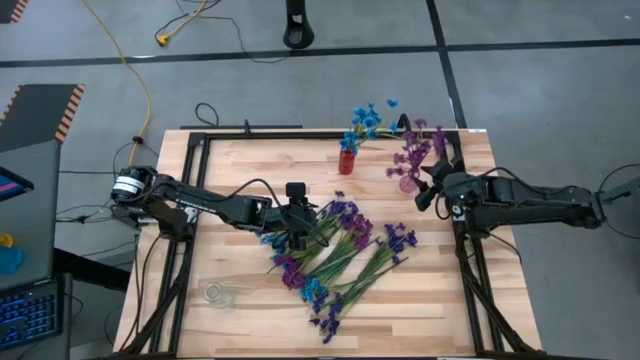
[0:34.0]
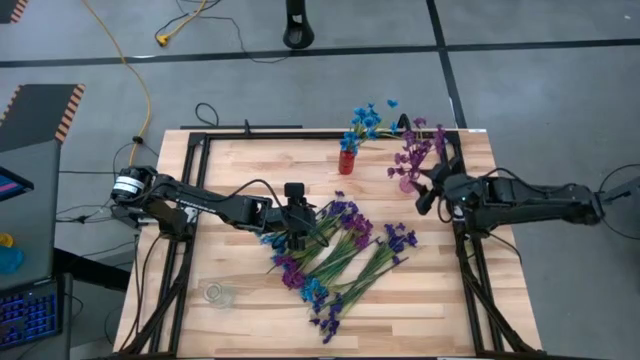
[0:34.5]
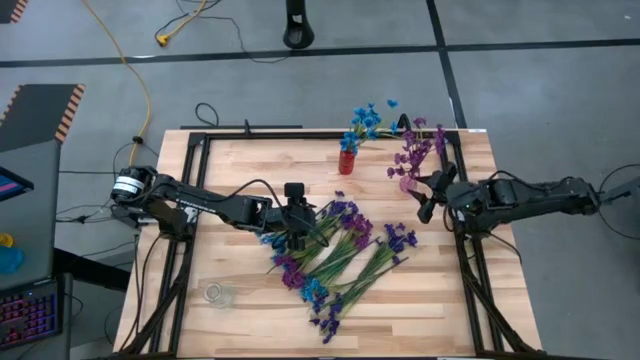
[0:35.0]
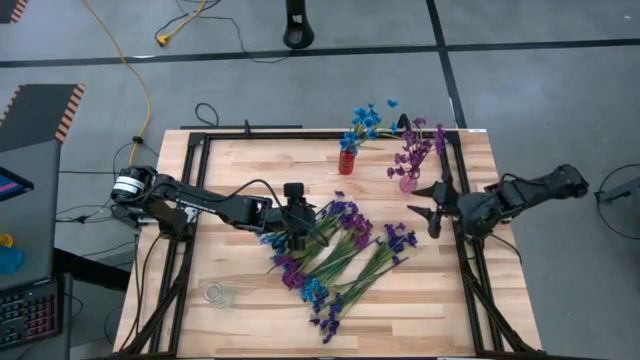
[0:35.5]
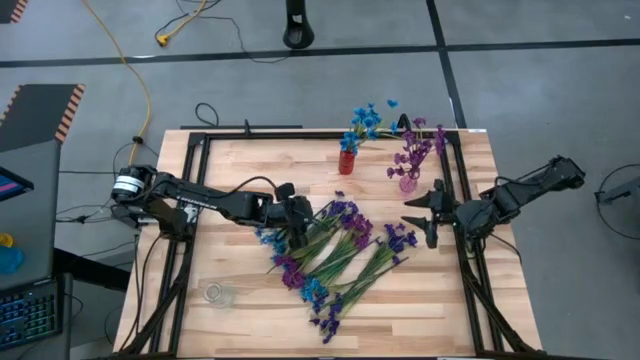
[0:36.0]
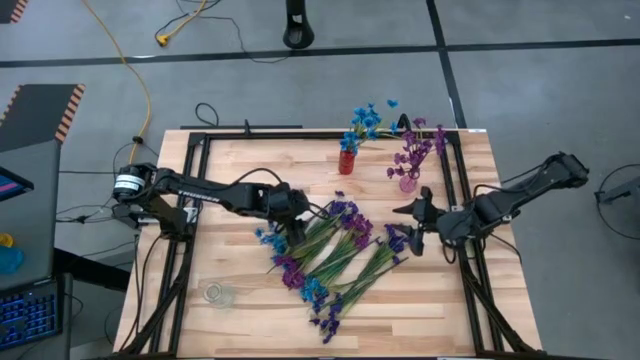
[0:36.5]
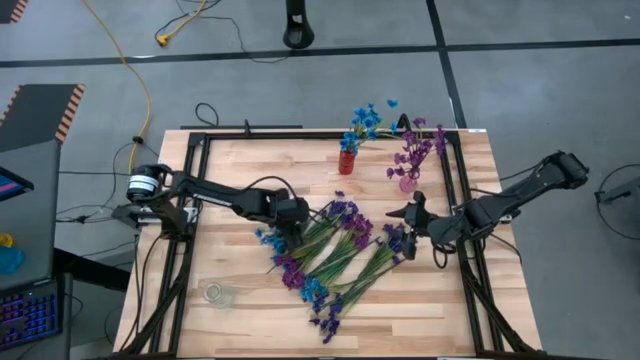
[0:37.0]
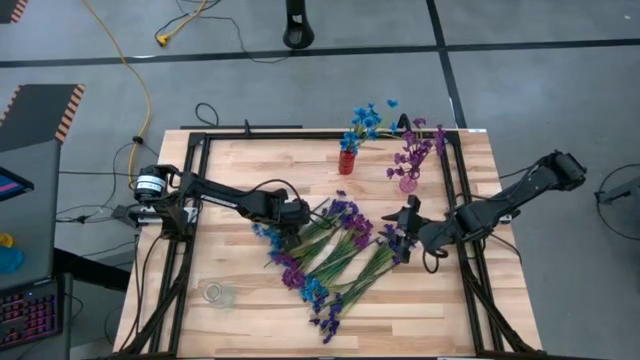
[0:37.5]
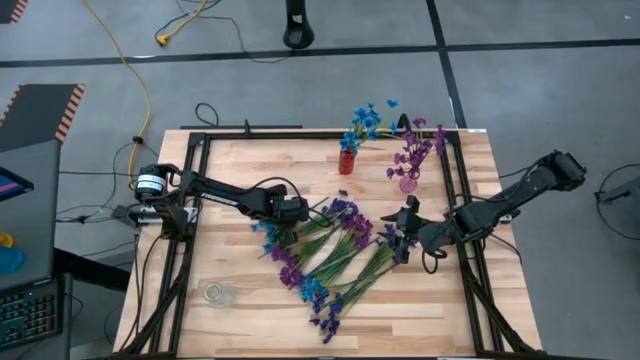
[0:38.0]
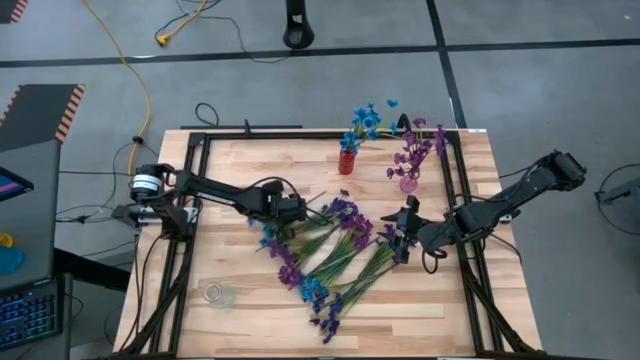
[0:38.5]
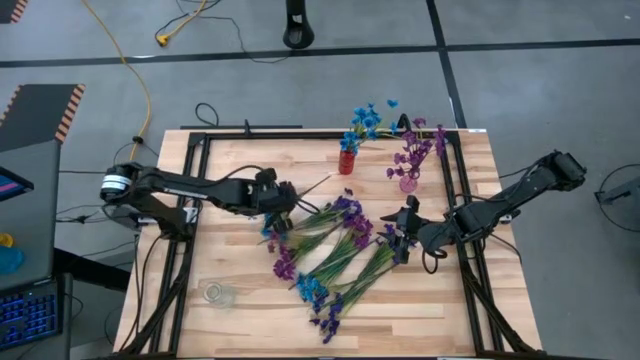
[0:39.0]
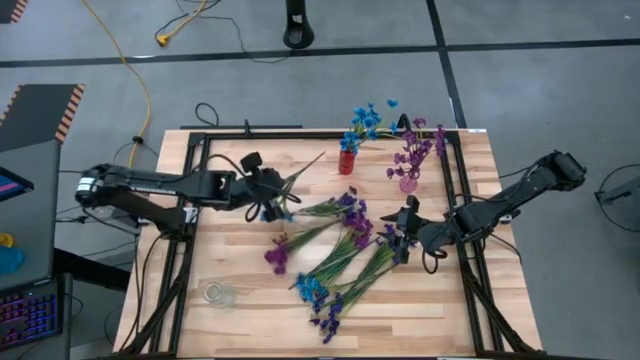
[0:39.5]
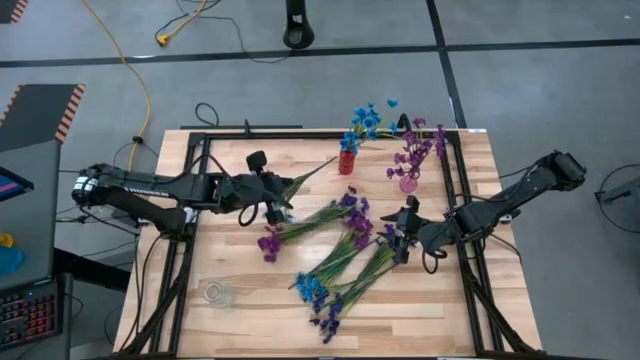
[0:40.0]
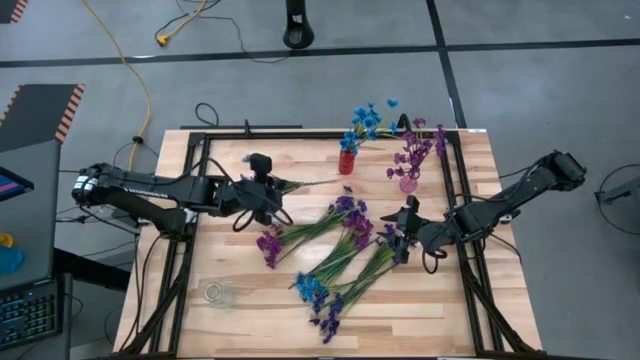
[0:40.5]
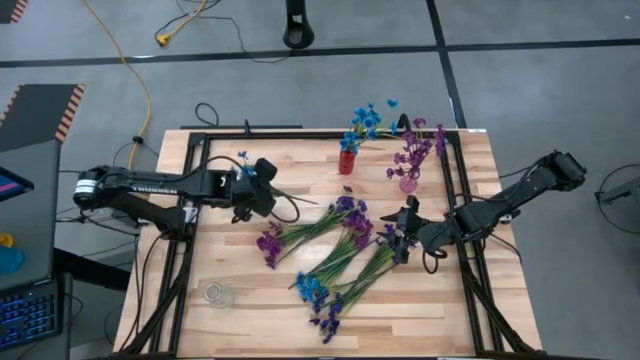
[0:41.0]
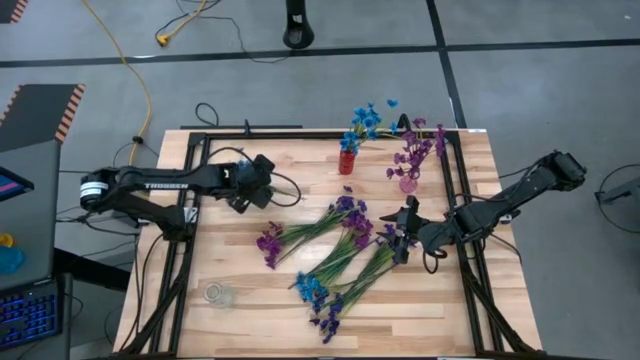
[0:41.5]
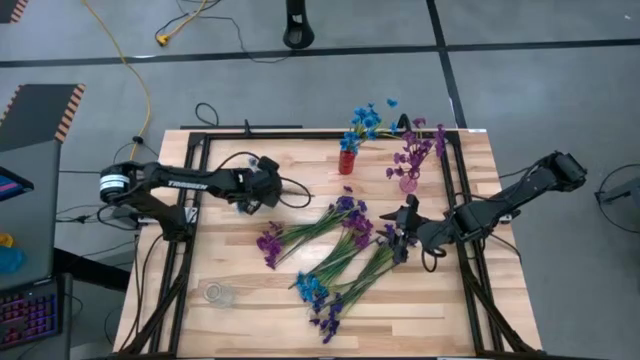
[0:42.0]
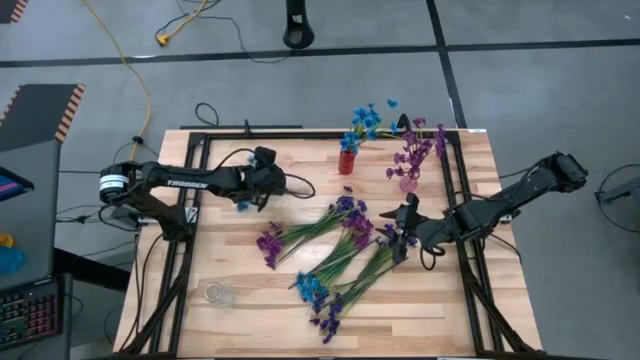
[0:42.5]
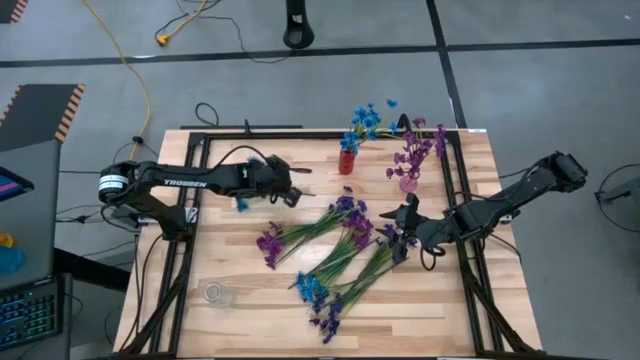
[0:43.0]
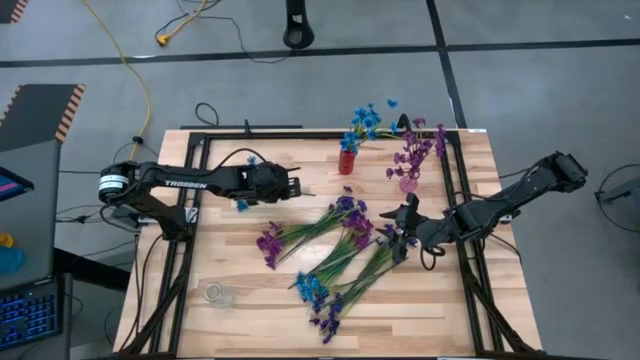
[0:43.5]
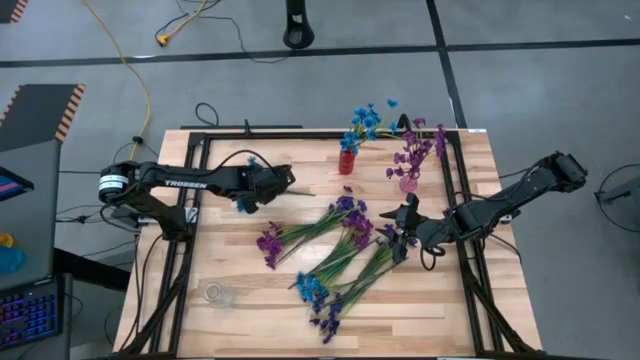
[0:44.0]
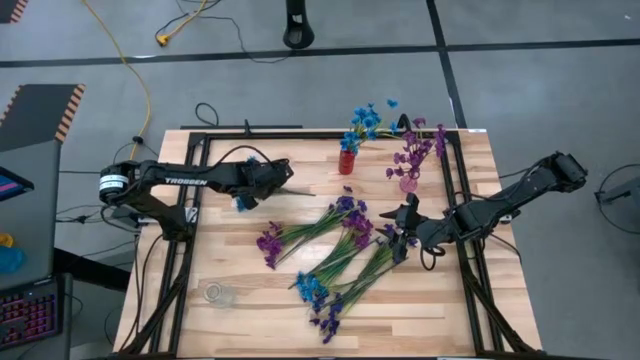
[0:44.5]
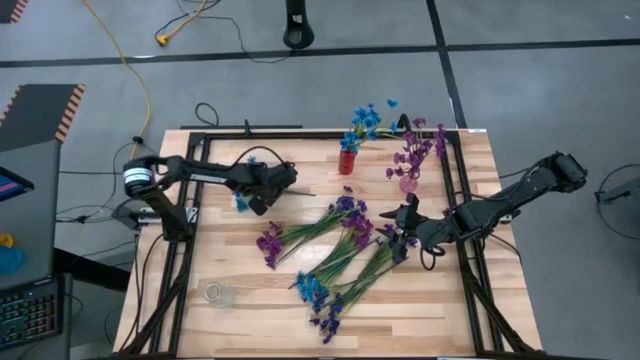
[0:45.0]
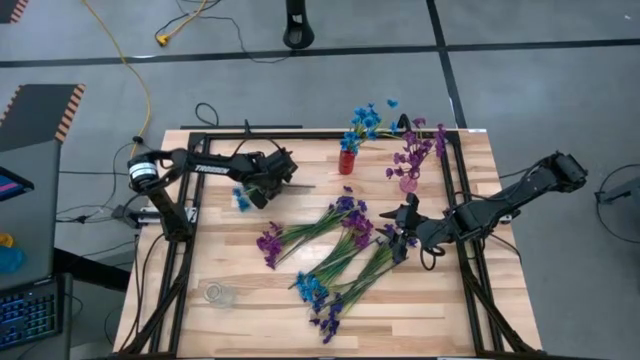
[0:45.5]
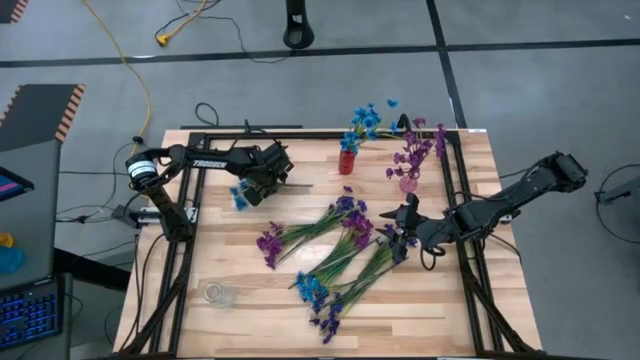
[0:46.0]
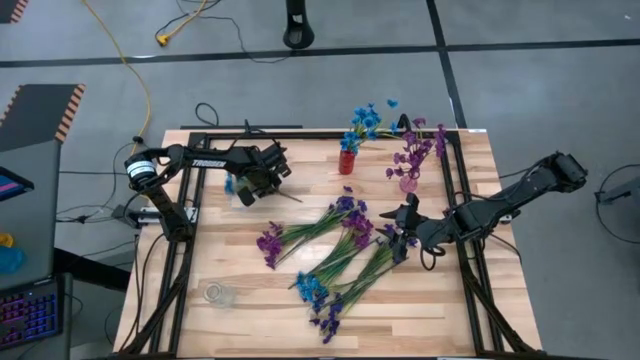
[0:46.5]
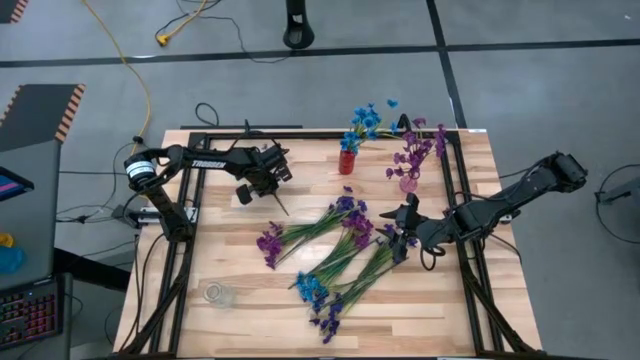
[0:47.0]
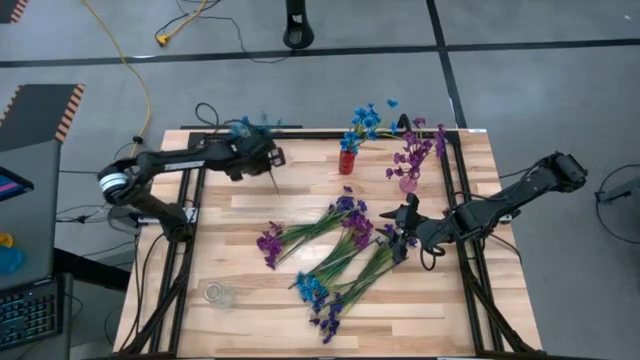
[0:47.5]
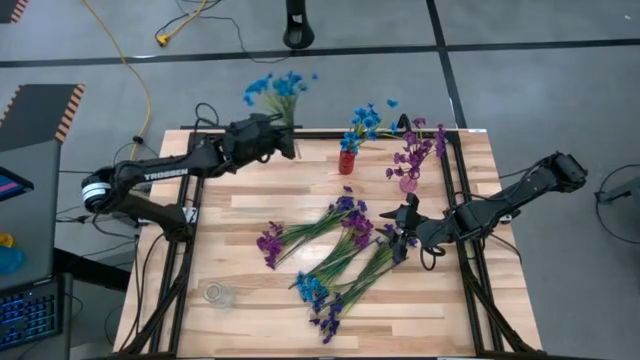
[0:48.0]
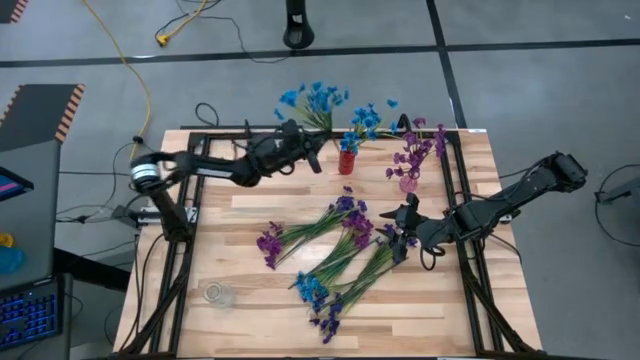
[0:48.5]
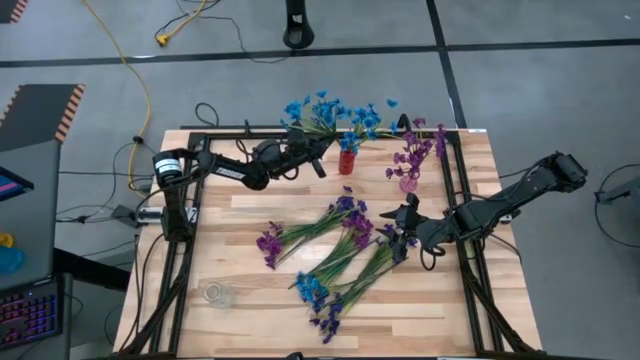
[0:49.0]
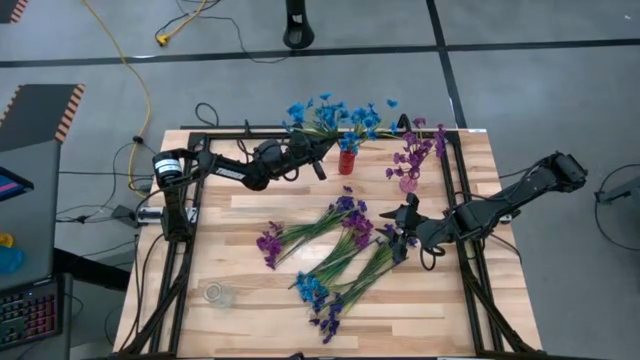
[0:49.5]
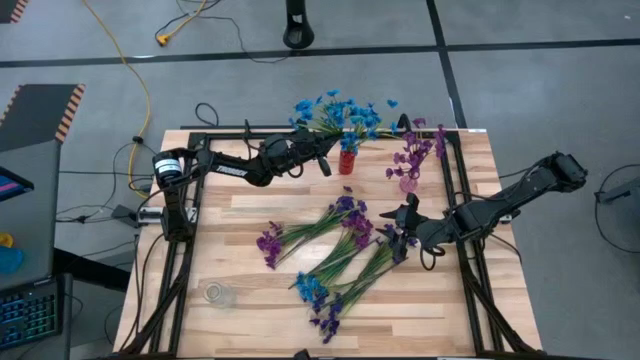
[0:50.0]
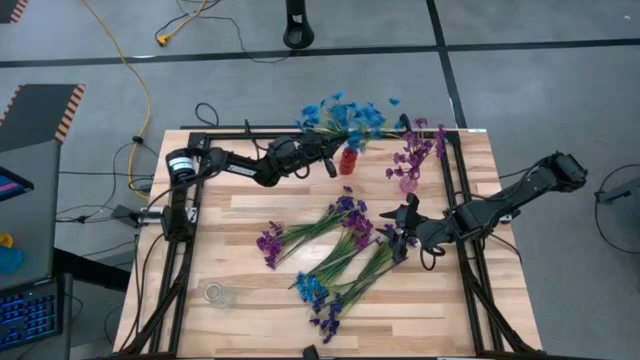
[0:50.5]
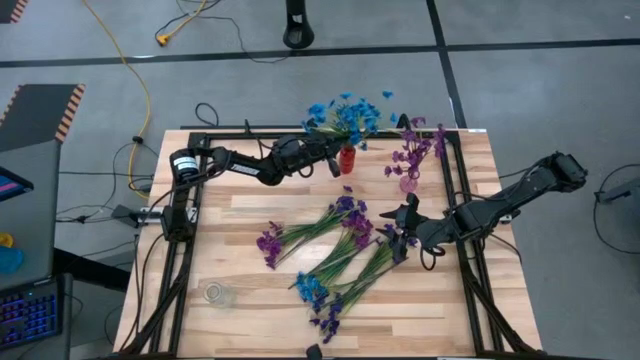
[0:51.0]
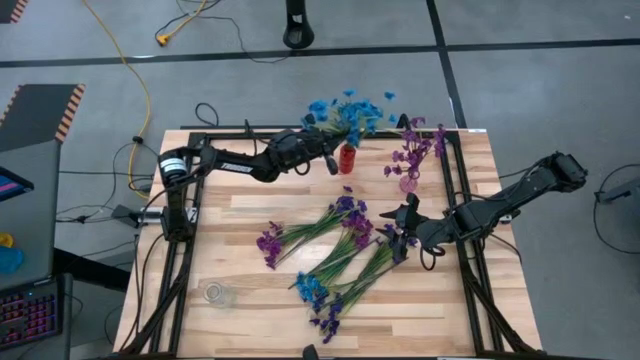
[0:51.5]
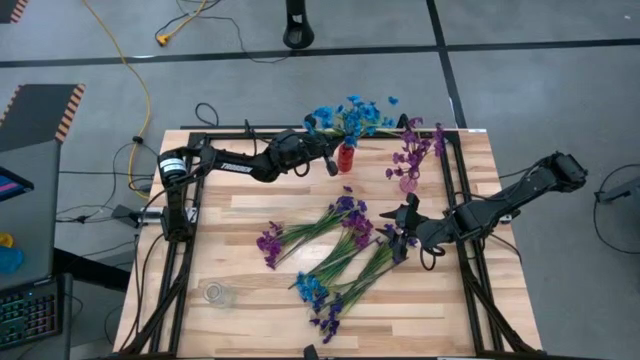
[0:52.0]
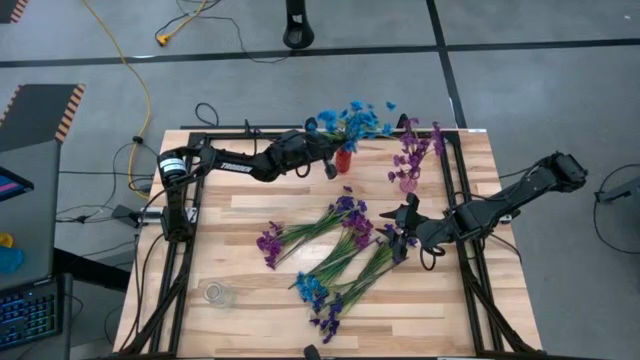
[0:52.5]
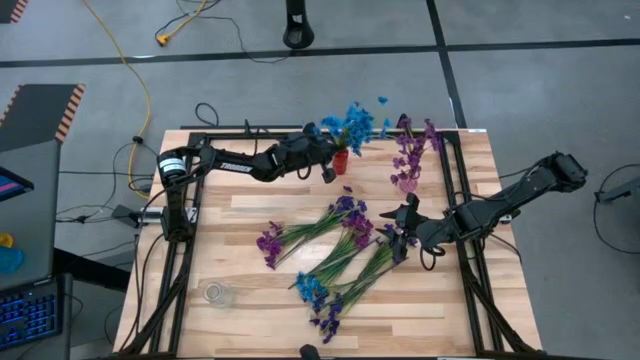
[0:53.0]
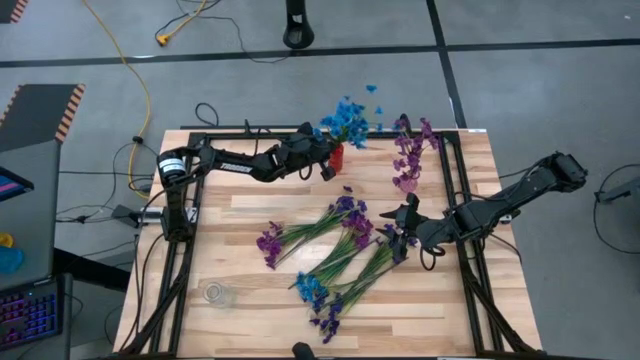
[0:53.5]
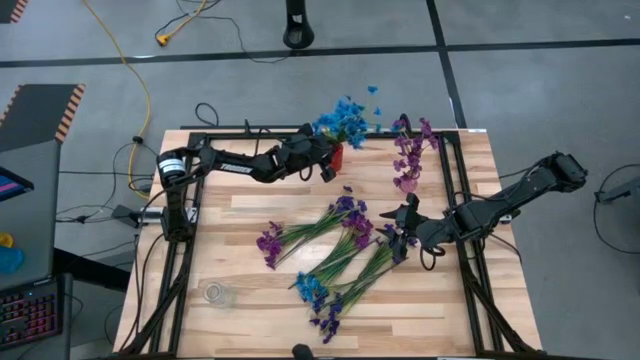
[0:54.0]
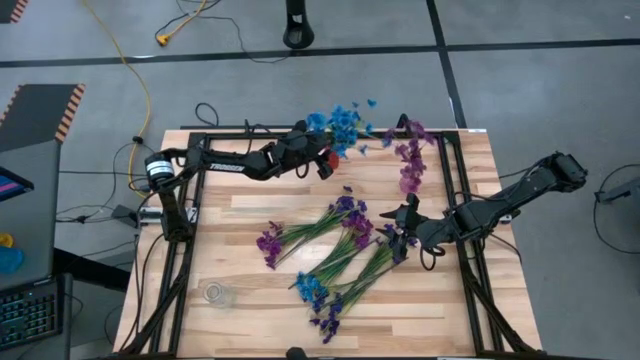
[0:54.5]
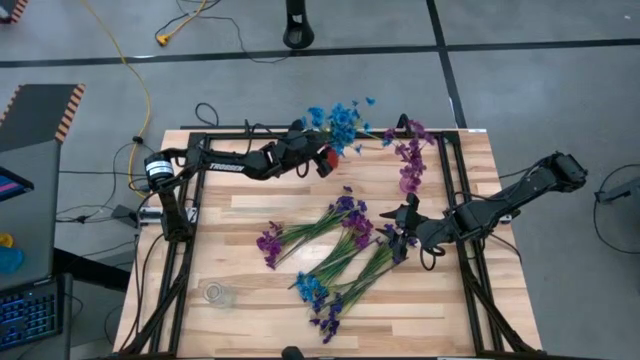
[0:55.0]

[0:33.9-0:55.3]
Task: Sort flowers into vase by color
Put the top blue flowers into the red vase
